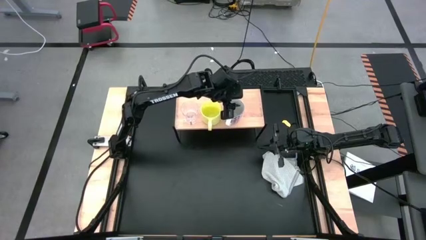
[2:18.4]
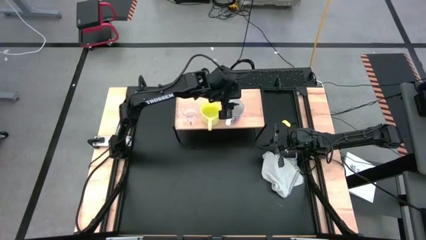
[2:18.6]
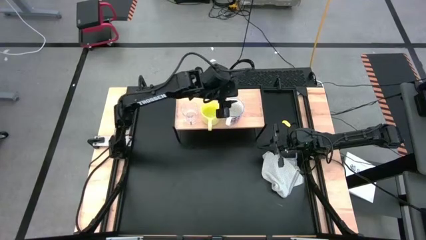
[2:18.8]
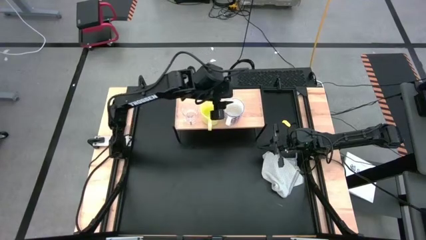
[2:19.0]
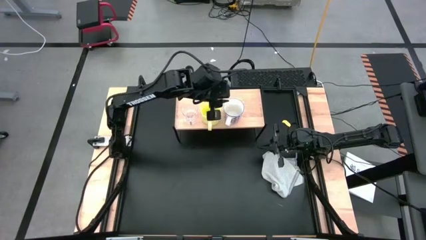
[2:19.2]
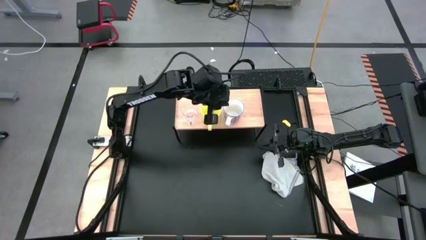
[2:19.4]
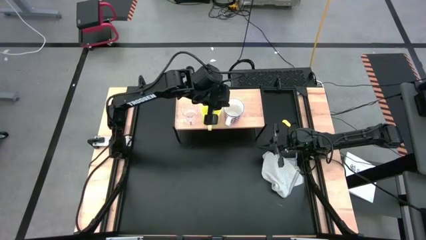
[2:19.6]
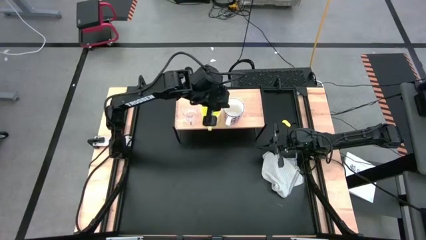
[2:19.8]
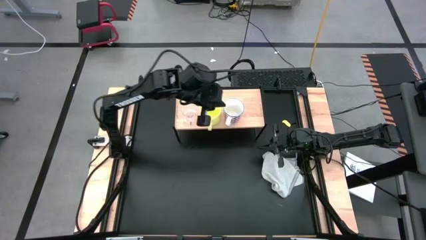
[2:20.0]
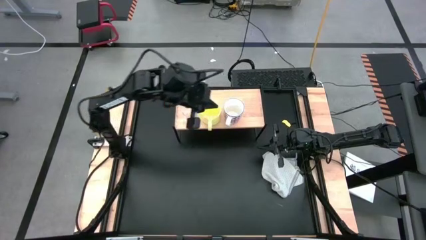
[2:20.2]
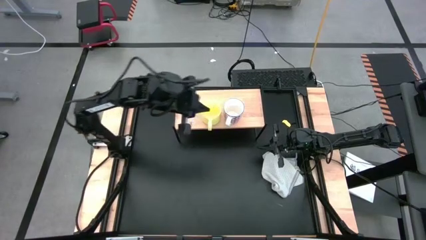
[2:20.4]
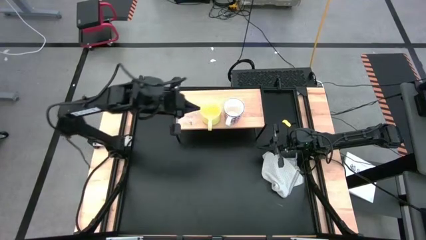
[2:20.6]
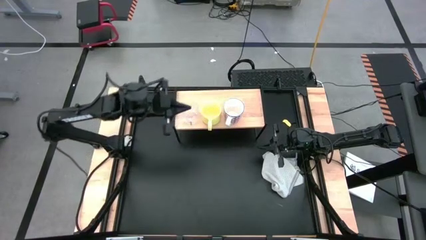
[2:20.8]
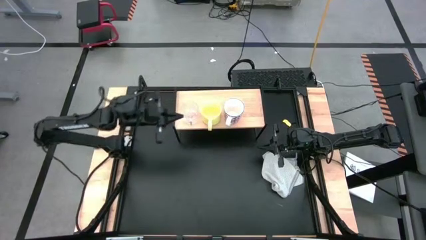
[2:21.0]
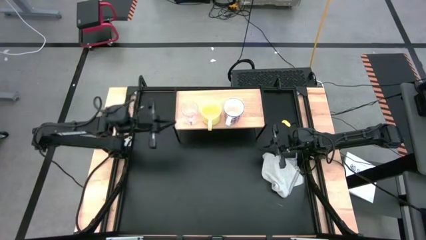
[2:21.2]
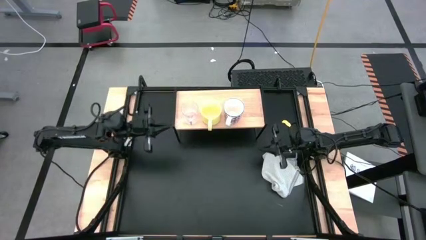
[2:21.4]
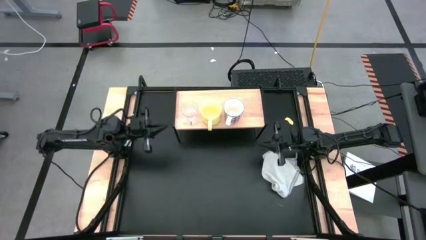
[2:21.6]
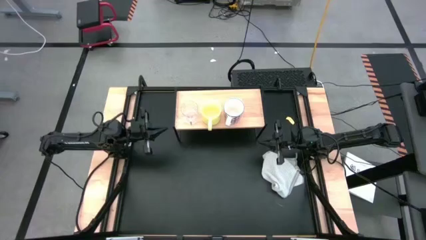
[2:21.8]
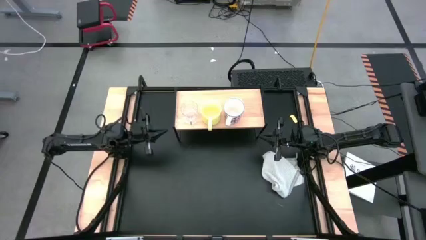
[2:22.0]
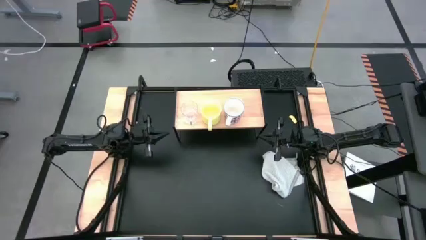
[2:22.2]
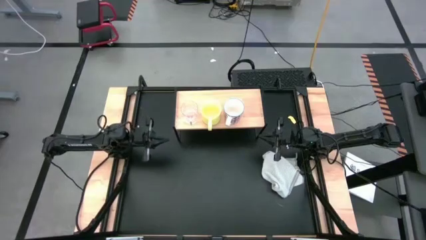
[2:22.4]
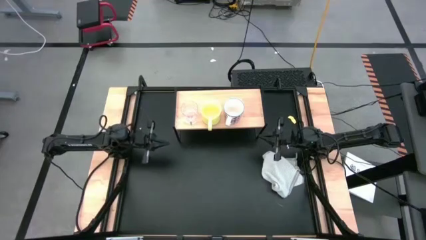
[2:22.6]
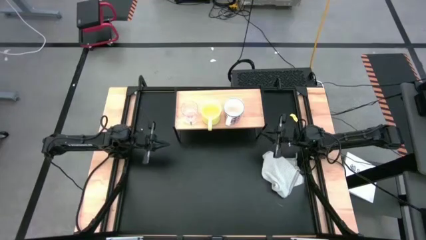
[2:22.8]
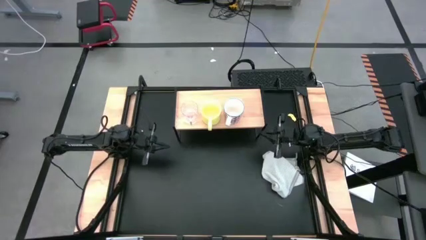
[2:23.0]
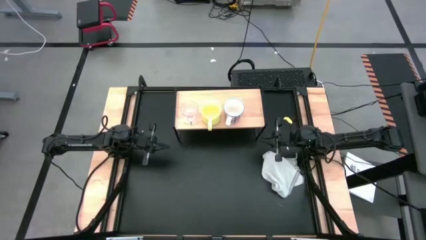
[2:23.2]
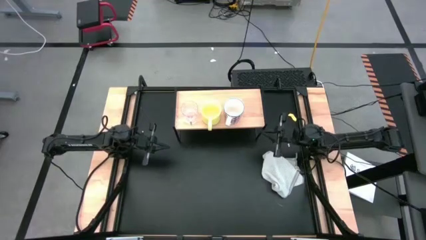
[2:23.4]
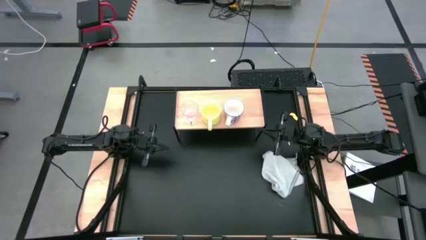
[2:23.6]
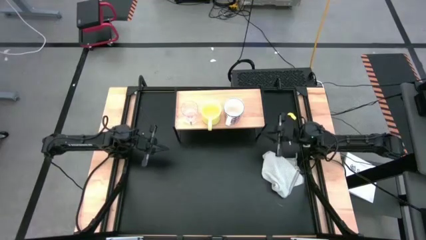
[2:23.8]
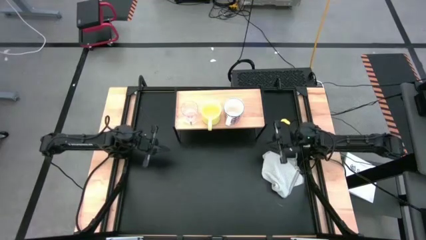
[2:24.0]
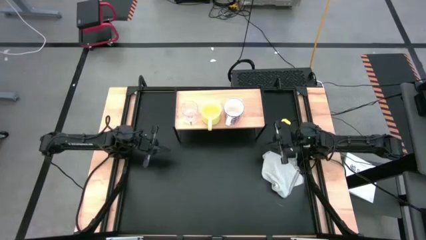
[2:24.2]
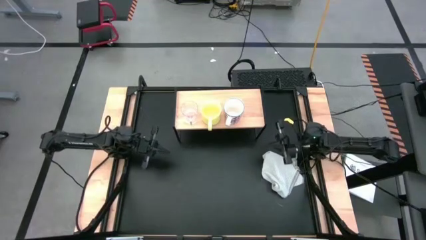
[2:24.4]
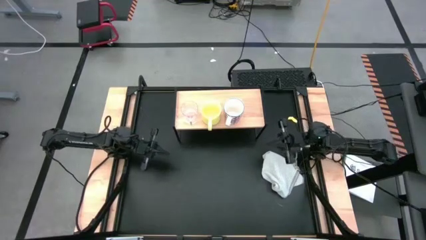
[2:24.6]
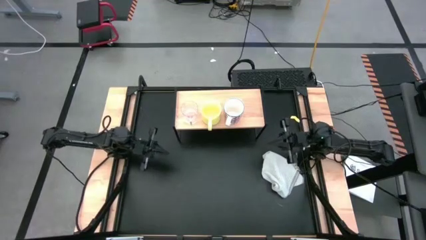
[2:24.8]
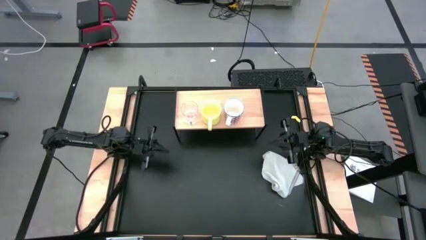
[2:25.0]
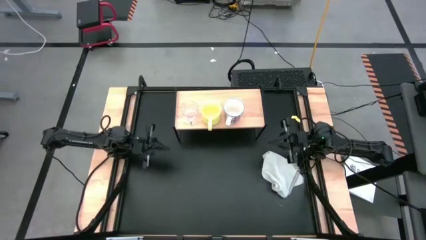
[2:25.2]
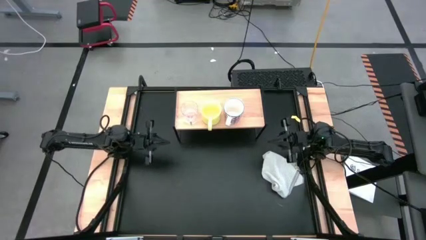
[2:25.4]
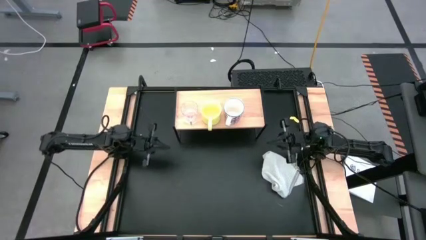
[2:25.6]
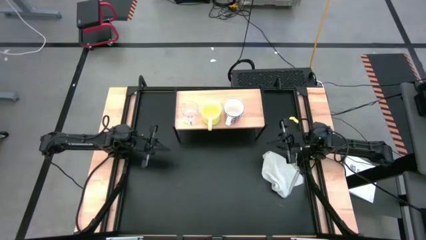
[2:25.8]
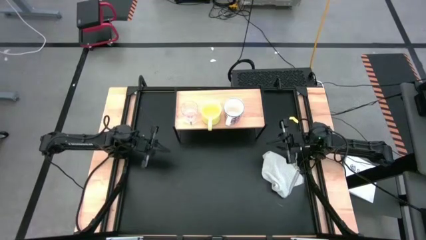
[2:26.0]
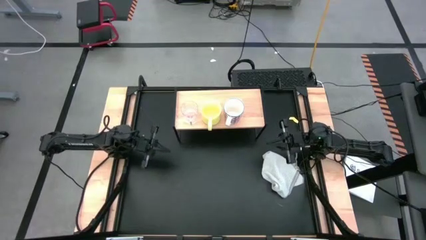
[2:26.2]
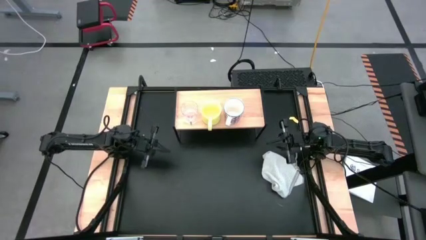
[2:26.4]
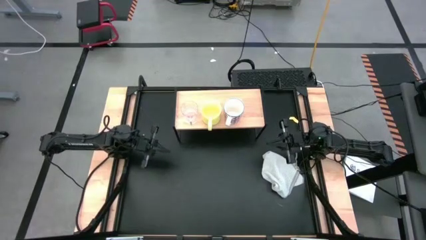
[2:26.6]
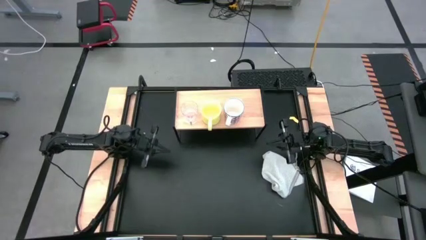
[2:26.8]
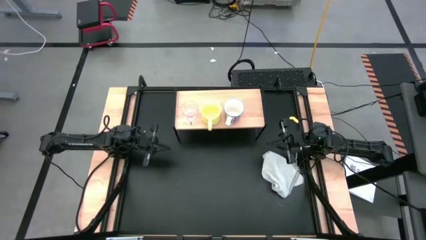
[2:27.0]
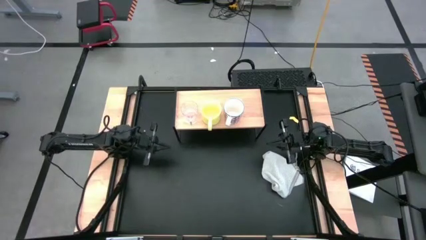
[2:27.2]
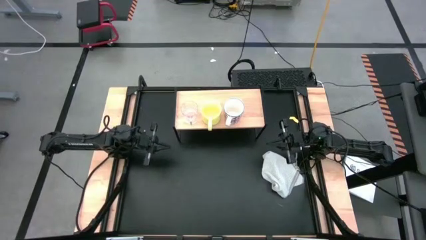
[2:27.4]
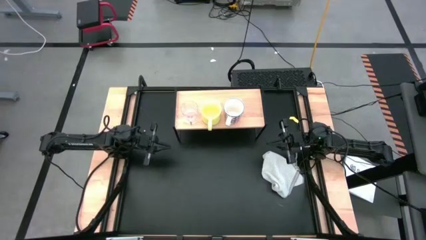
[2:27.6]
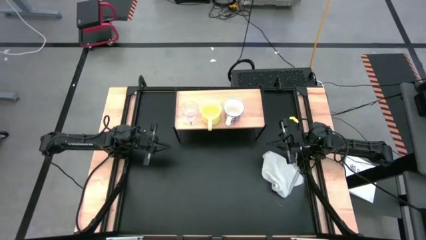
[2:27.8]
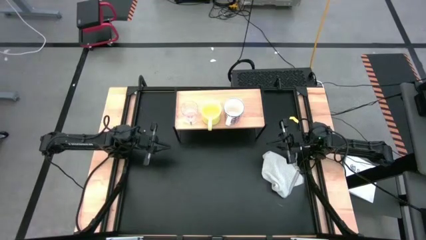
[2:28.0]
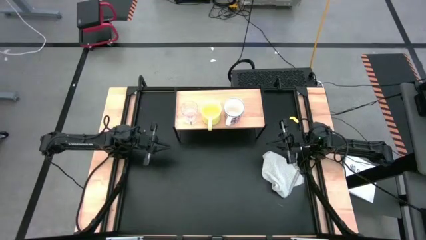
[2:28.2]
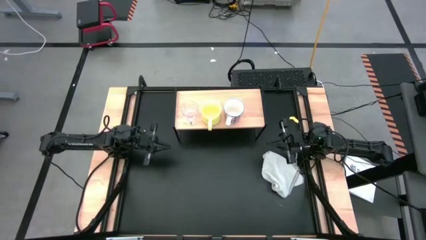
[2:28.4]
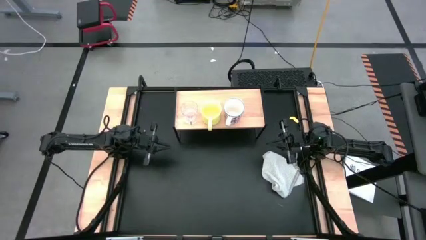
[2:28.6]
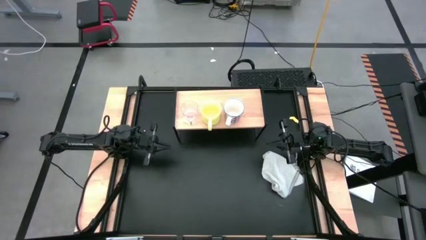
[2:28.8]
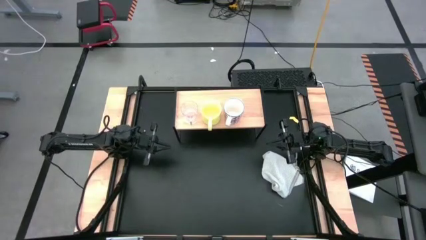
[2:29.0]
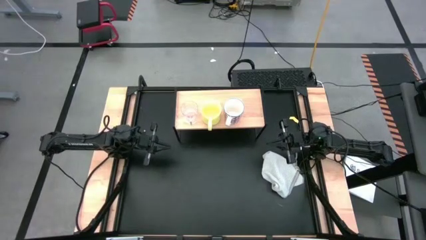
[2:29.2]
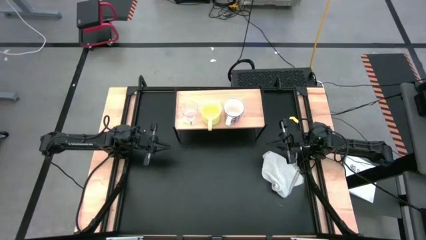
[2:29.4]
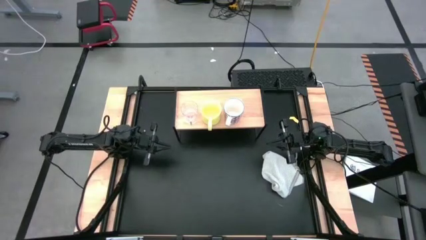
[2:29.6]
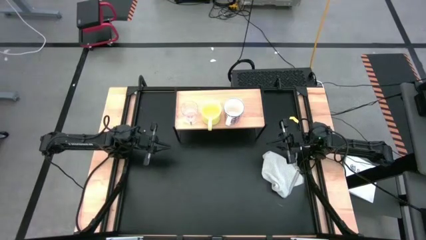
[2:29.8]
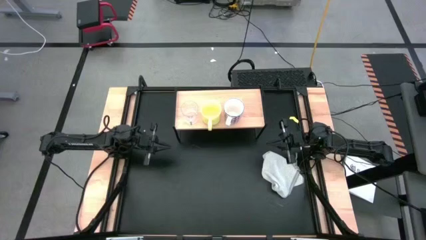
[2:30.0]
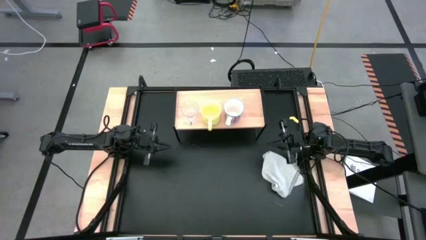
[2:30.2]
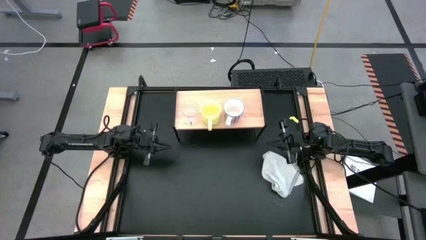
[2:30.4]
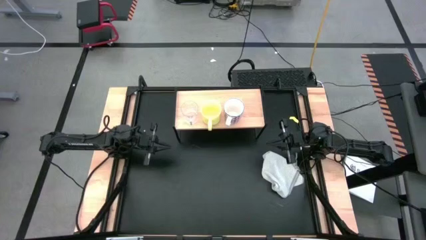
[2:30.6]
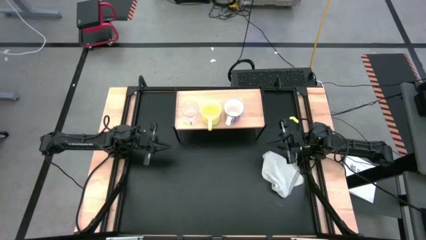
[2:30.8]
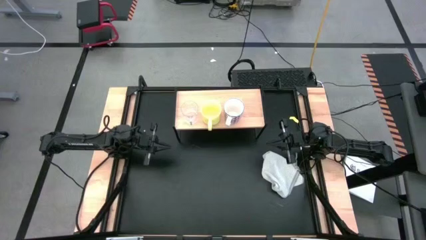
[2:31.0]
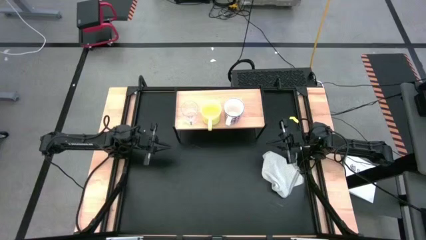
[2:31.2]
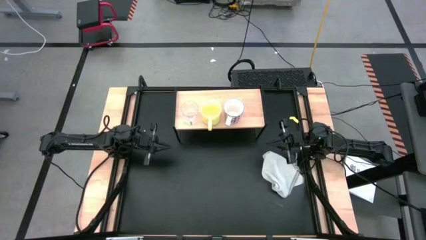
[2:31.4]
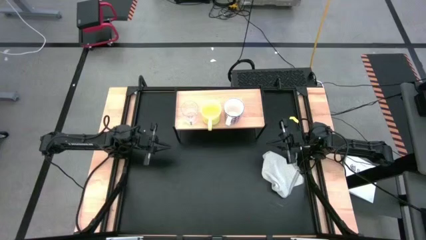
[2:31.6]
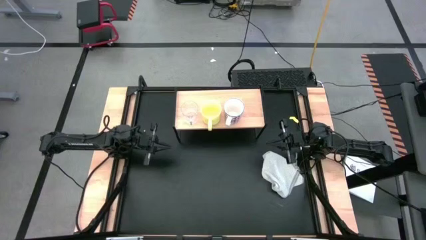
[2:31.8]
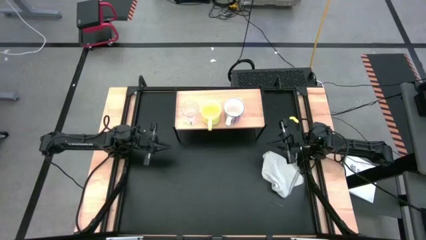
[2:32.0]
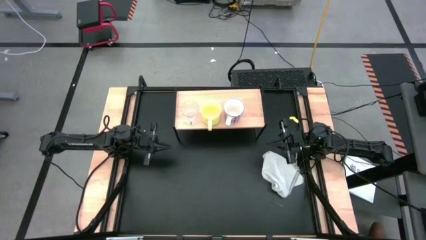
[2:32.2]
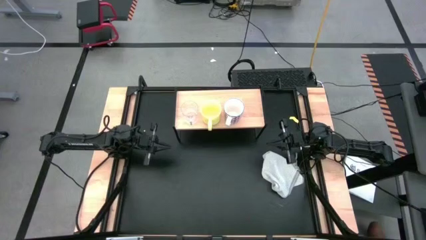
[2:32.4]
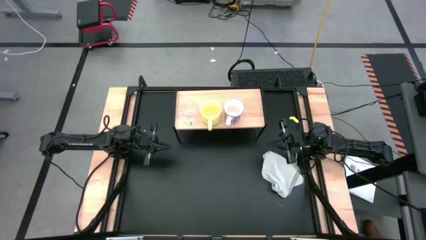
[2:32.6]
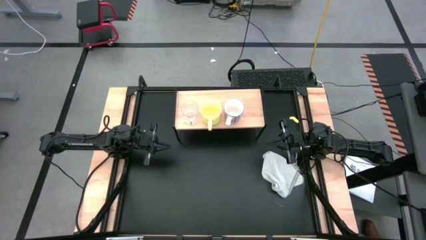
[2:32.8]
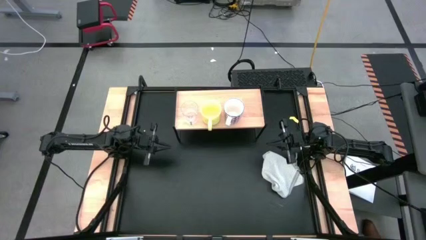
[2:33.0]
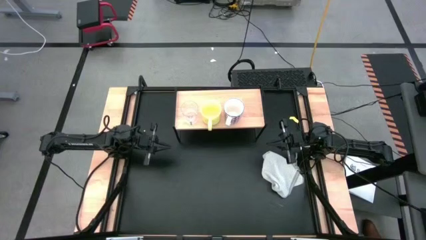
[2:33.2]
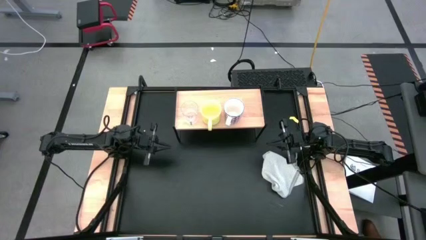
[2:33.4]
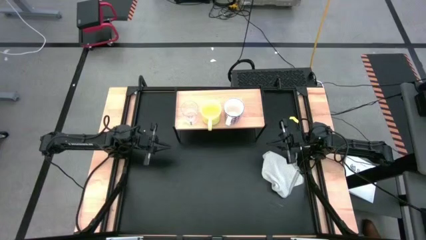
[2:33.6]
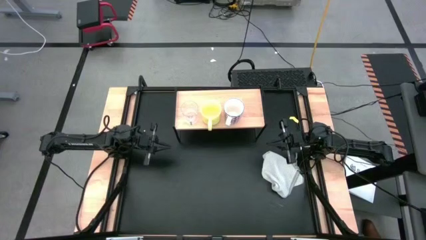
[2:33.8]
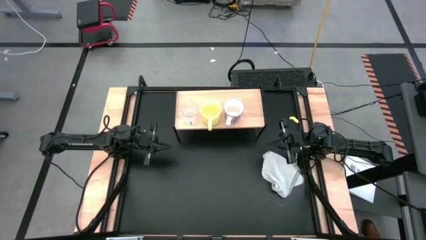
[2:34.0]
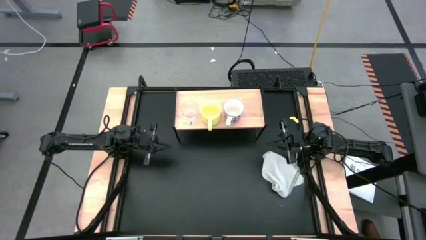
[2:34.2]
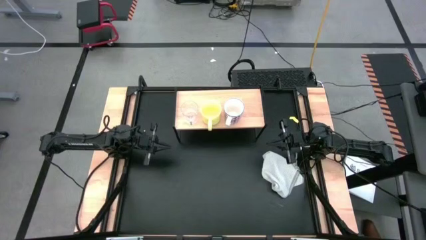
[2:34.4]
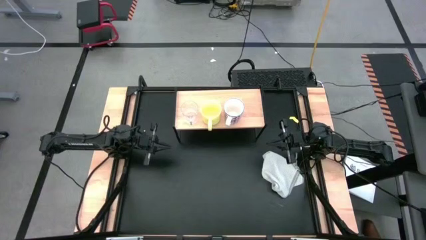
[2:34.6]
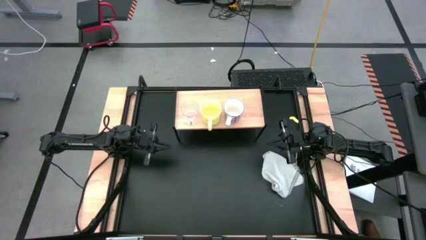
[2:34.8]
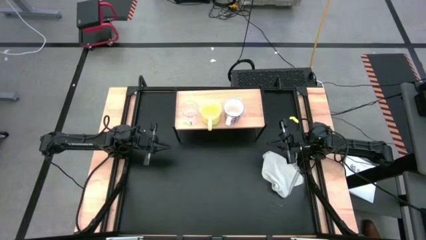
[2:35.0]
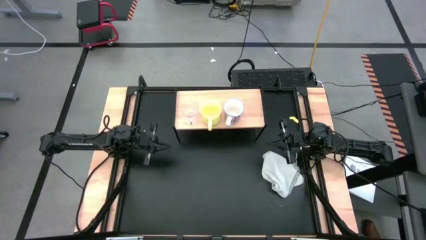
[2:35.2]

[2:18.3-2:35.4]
Task: Stack small to large cups/mugs on shelf
Return to Home Position
